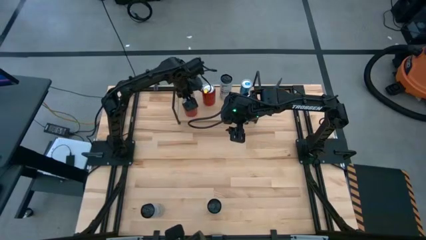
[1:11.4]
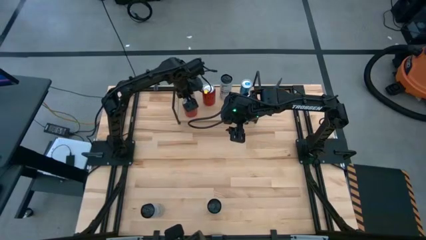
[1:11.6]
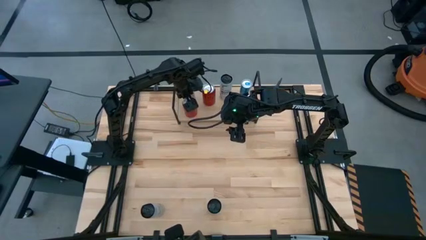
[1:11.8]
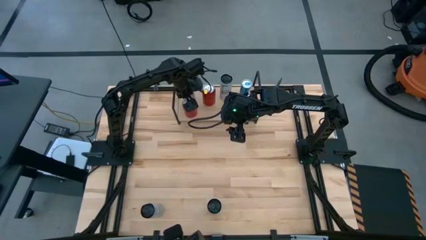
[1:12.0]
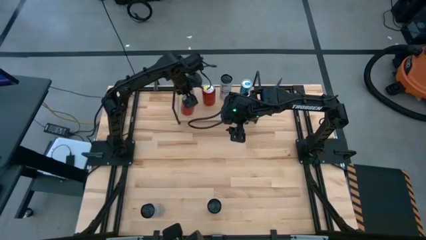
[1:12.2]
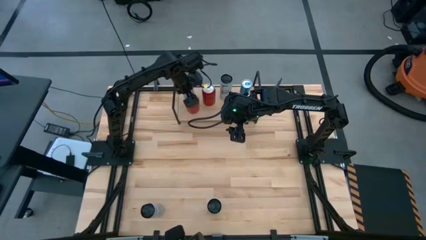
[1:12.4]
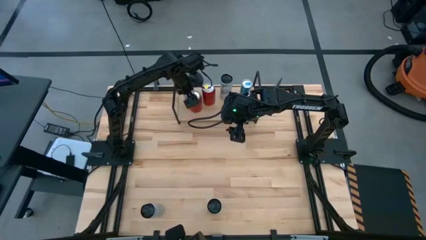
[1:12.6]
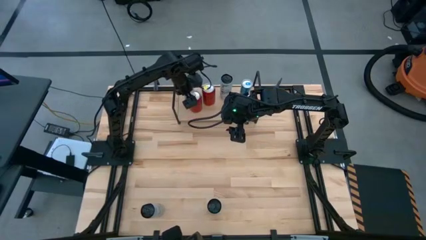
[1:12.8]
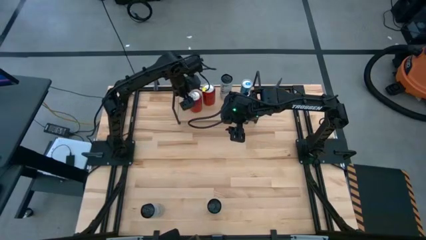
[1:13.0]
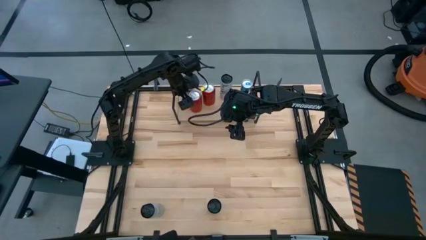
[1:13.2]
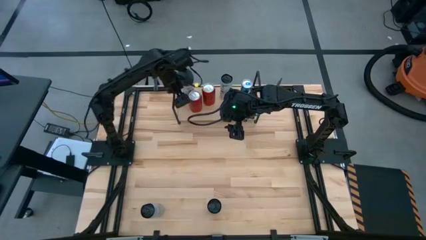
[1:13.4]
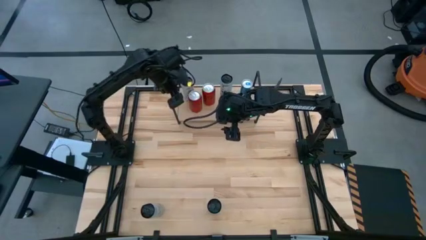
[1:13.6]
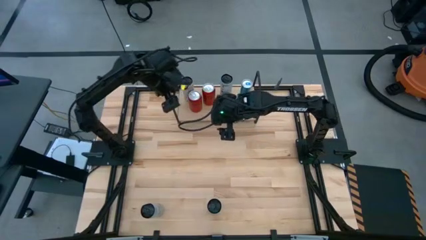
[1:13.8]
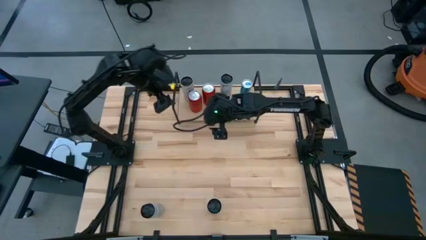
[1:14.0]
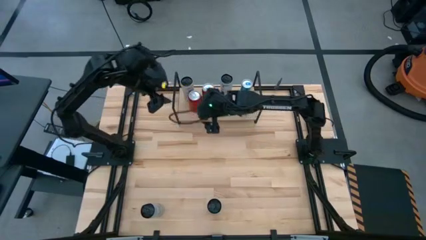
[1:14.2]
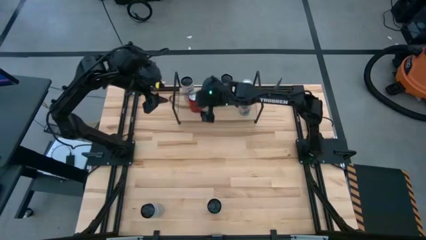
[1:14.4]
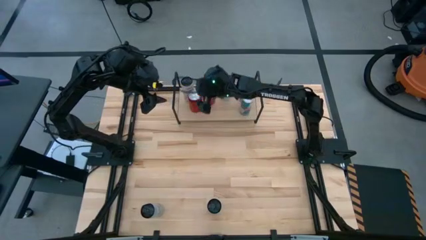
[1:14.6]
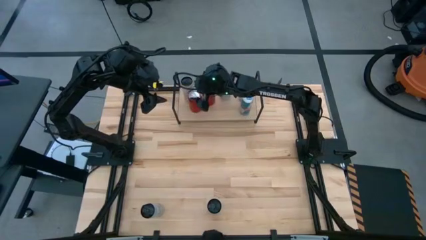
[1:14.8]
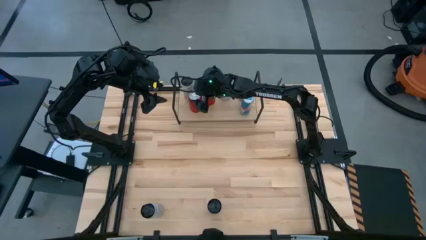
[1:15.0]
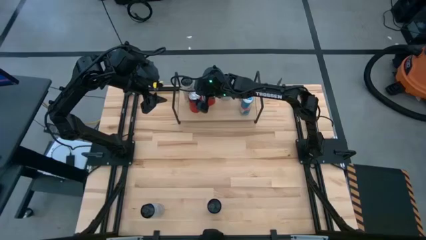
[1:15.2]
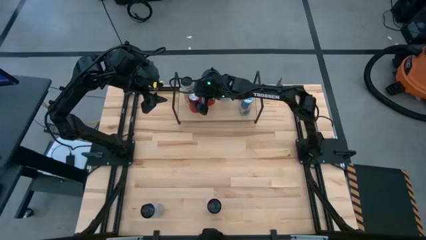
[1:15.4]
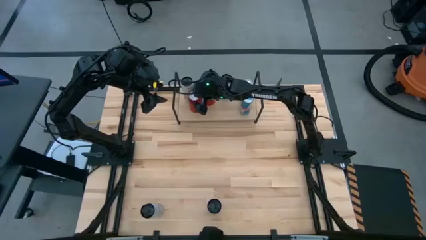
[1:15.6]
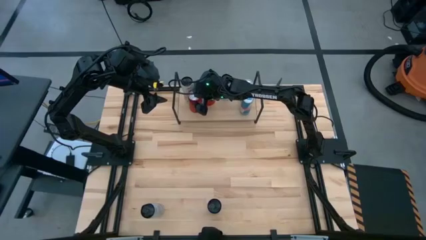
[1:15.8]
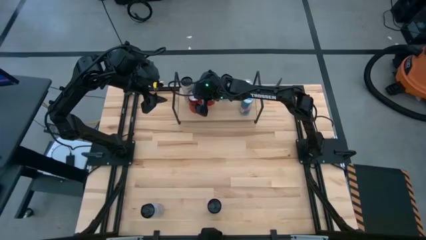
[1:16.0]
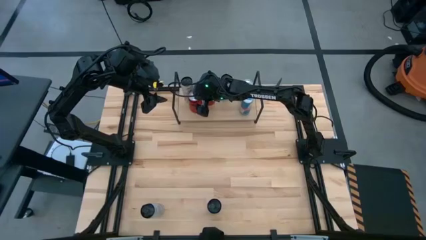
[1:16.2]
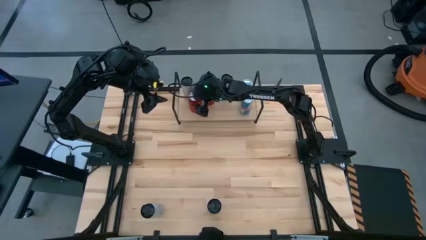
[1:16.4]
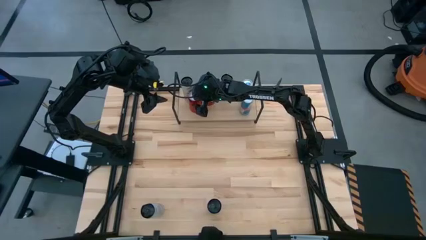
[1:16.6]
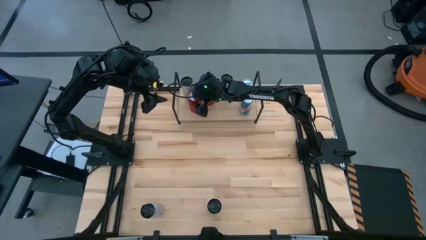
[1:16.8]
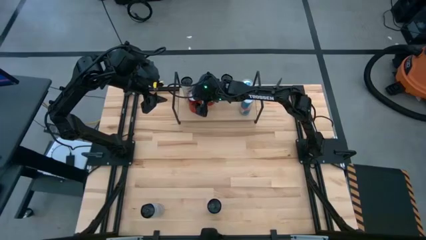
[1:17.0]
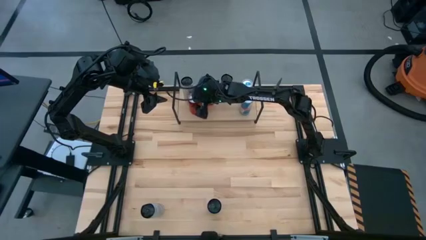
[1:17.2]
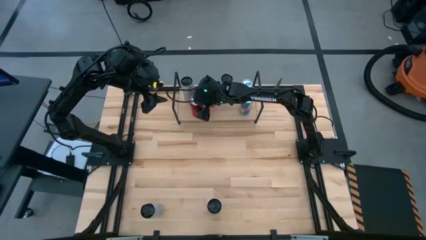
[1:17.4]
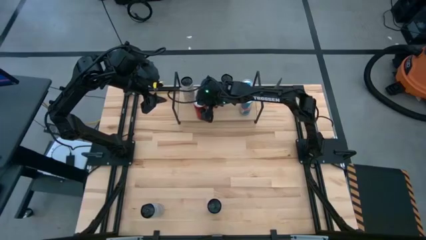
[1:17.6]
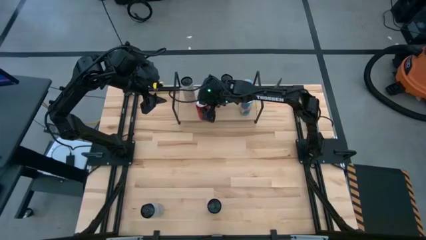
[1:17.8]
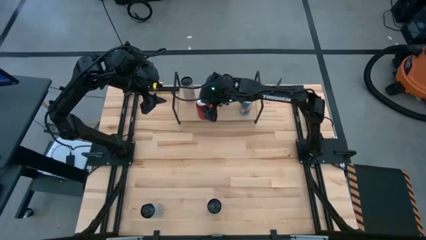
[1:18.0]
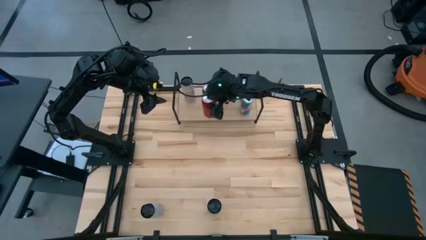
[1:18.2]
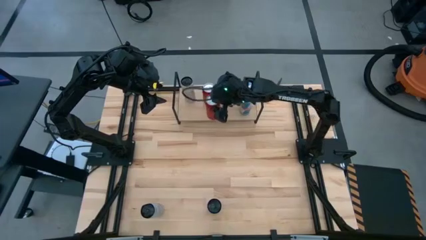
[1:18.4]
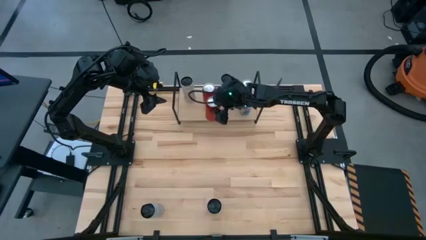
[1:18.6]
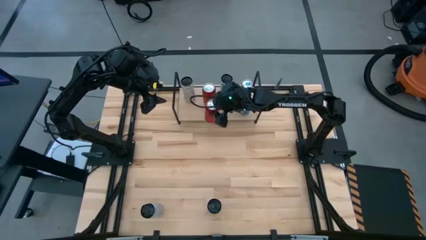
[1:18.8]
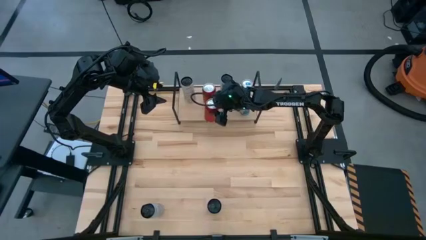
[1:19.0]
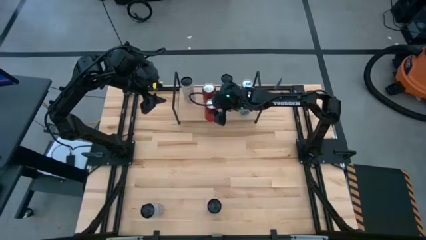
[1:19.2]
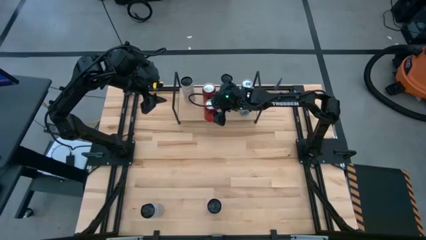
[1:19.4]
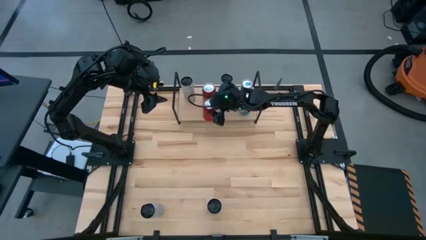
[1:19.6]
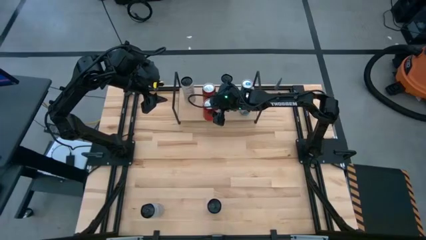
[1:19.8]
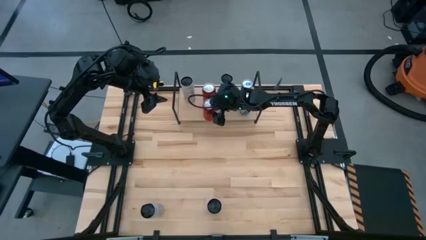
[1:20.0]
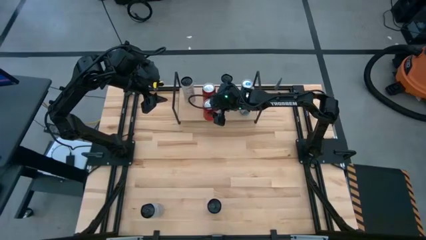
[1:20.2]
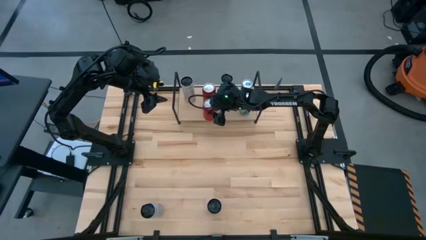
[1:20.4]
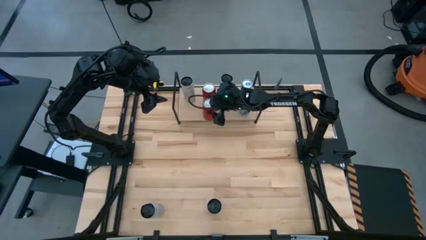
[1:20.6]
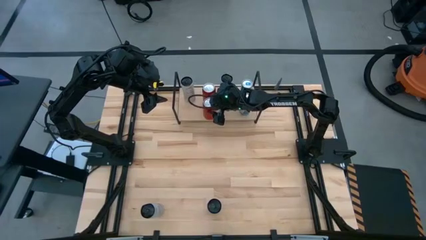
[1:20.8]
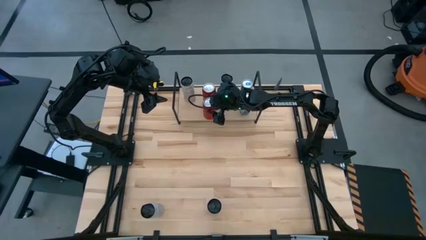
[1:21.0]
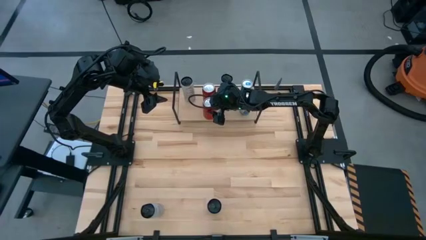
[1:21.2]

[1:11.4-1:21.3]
Task: Place canned beverage on shelf
Put the red soda can on the shelf

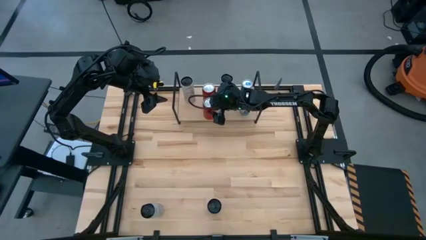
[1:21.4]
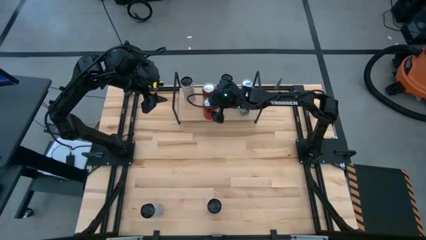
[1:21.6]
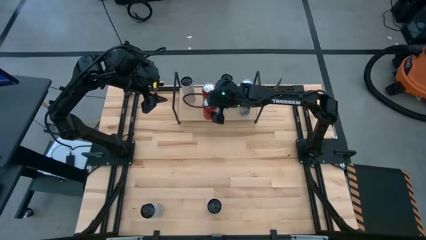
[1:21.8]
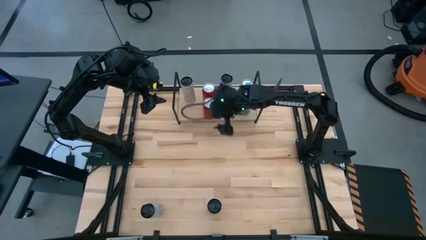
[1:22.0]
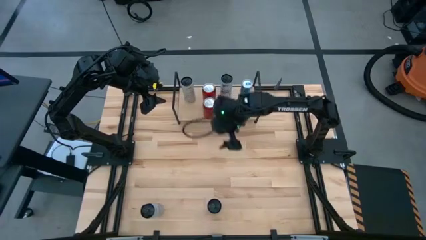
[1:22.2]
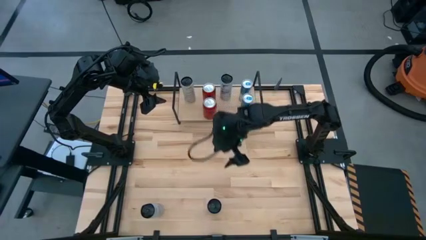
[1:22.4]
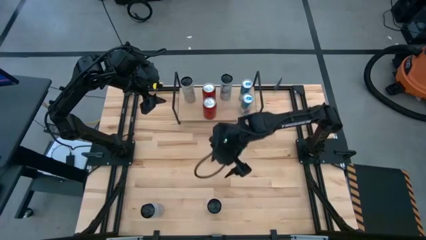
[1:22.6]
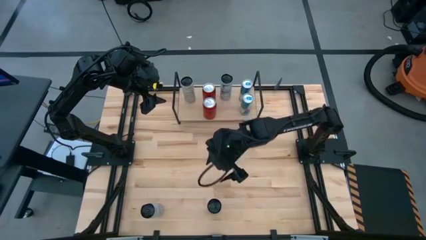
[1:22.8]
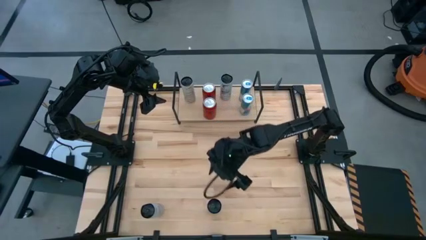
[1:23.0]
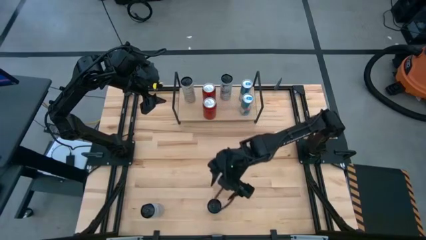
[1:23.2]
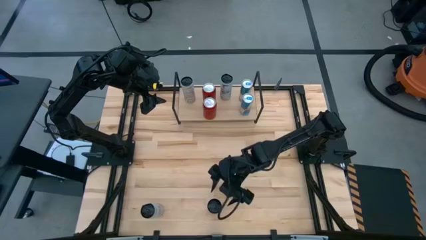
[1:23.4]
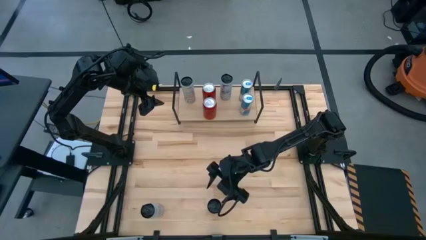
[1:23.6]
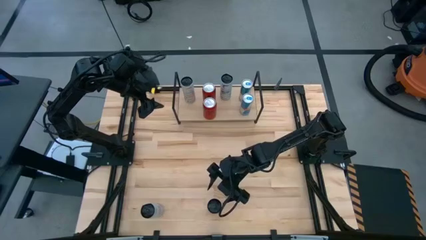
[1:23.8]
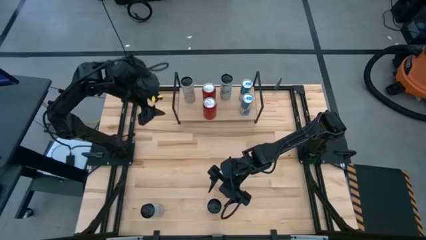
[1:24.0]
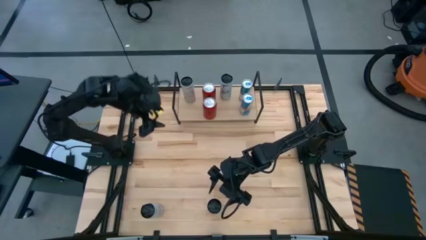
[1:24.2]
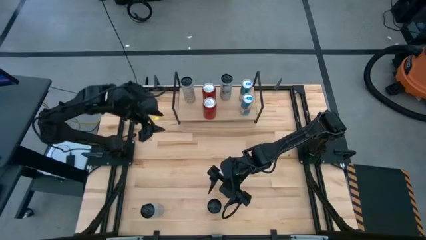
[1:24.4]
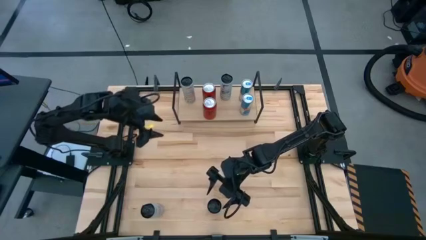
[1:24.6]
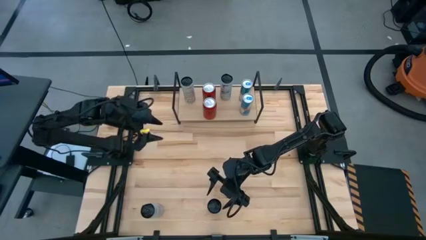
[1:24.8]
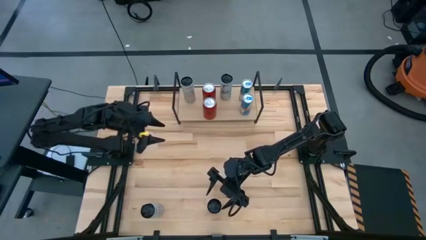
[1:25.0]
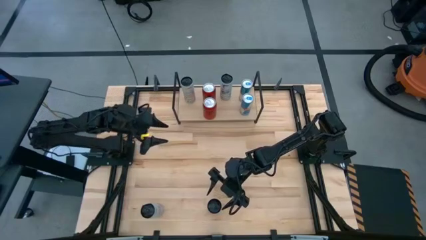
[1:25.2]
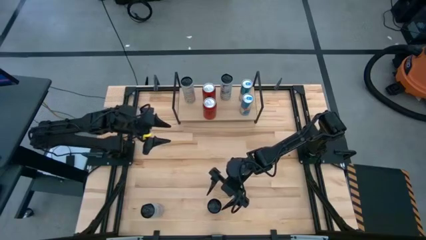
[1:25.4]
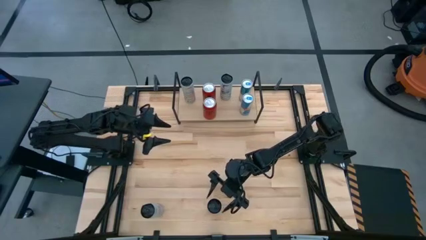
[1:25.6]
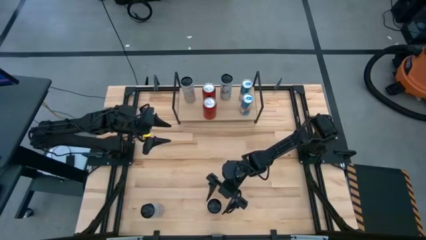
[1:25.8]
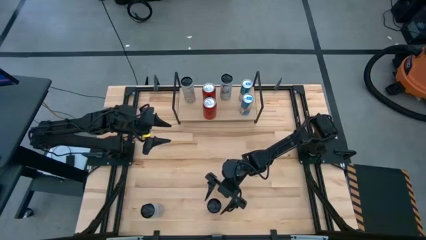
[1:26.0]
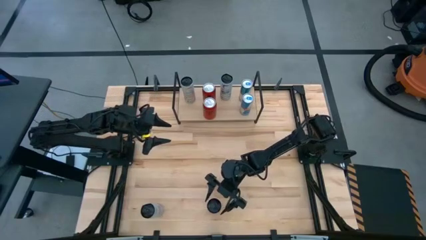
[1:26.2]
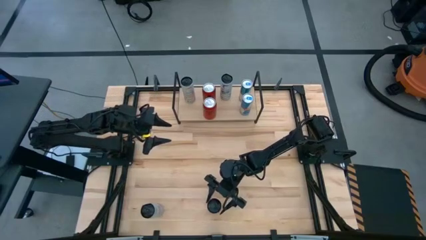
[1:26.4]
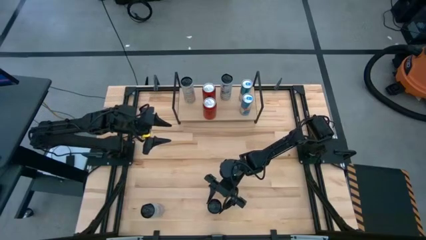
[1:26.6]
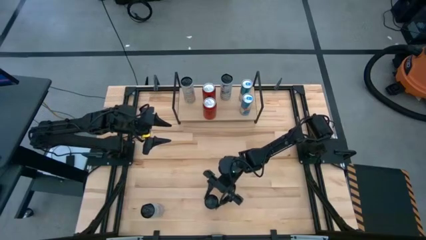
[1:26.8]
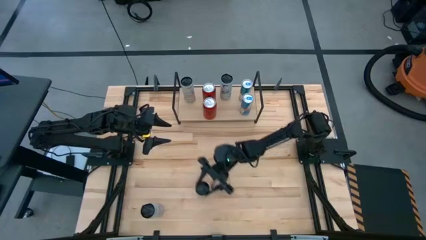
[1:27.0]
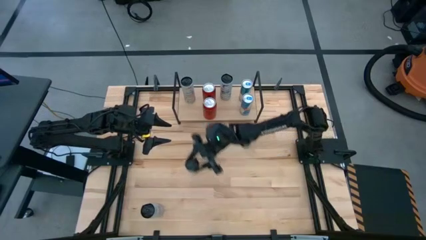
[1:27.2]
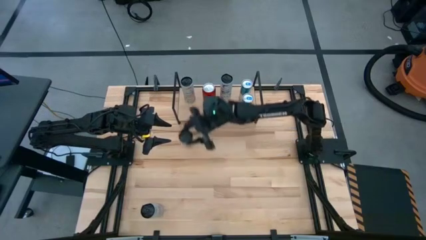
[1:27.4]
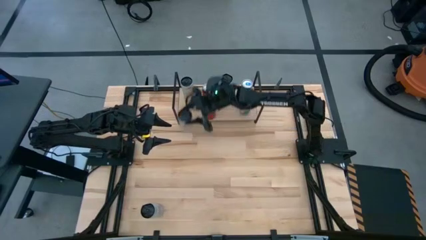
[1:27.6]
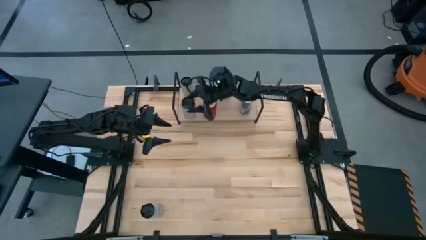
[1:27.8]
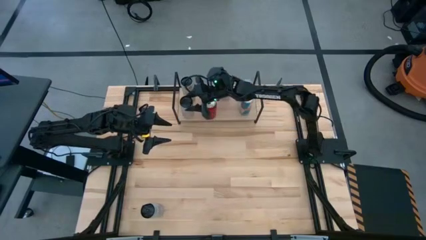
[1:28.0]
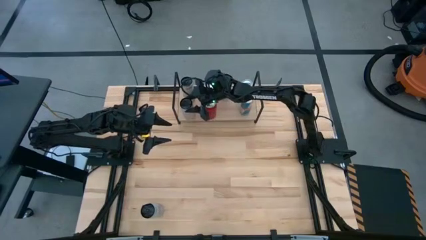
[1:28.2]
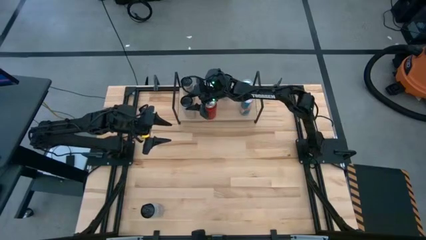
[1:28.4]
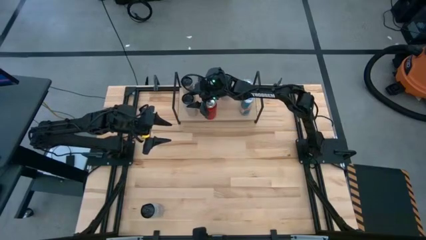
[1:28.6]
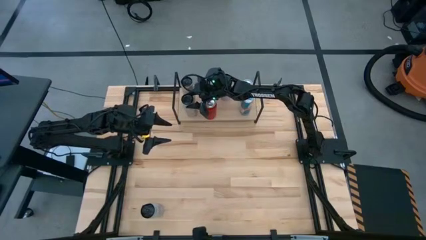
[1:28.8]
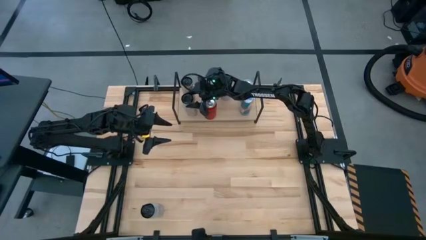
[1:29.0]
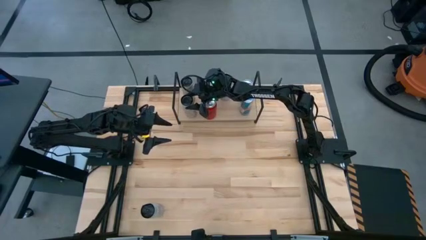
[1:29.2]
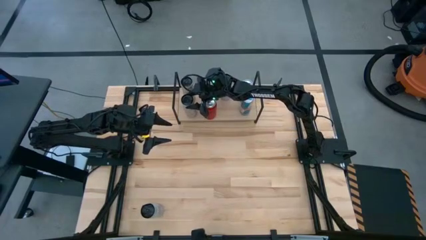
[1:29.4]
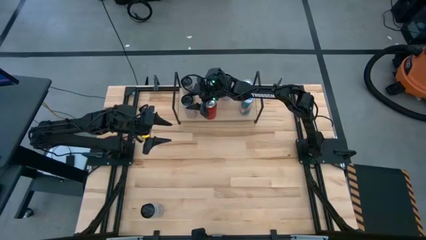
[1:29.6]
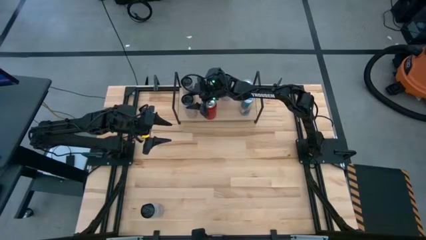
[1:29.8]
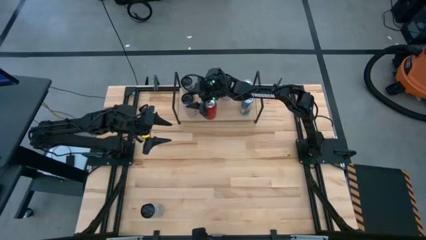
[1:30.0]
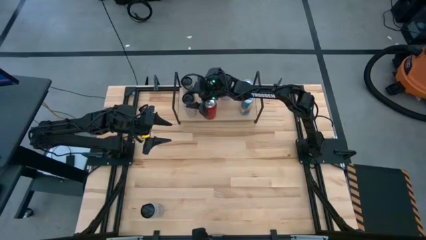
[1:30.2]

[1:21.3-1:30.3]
Put the orange soda can on the shelf
